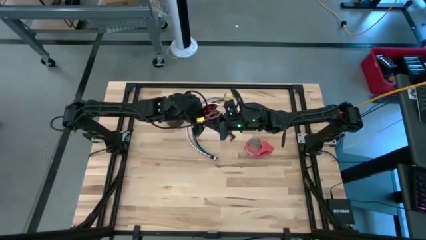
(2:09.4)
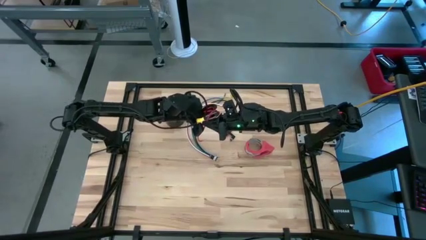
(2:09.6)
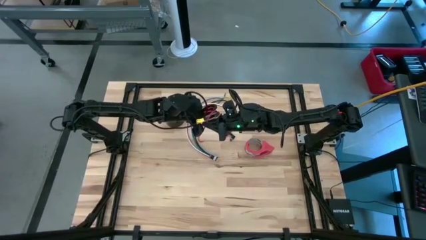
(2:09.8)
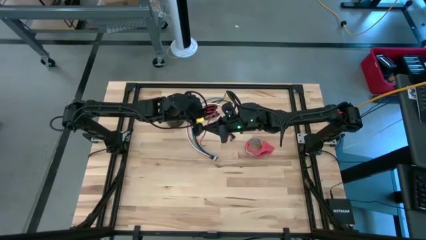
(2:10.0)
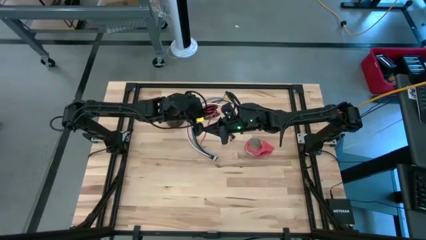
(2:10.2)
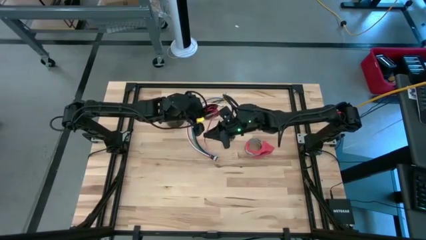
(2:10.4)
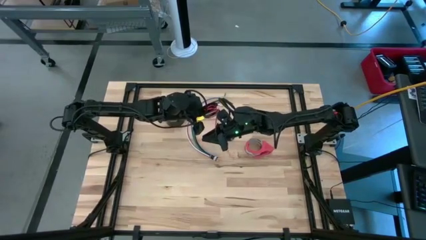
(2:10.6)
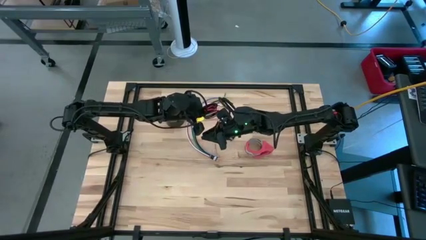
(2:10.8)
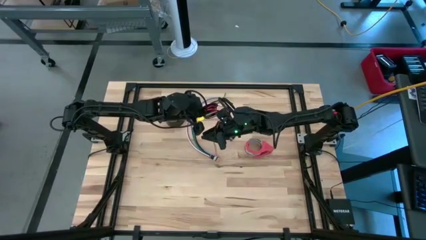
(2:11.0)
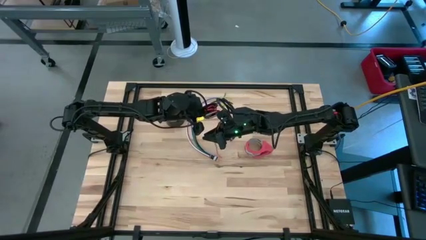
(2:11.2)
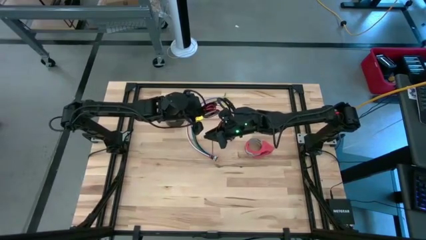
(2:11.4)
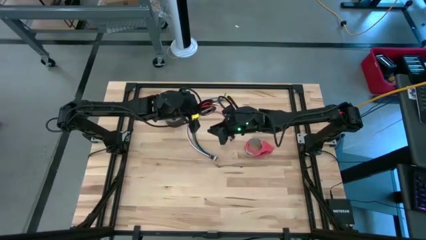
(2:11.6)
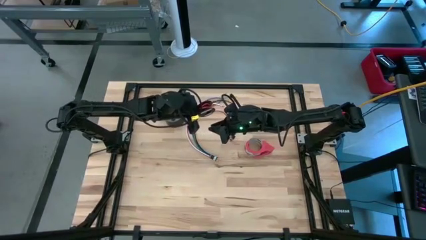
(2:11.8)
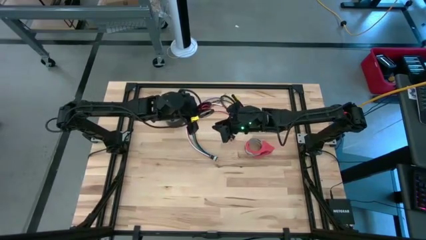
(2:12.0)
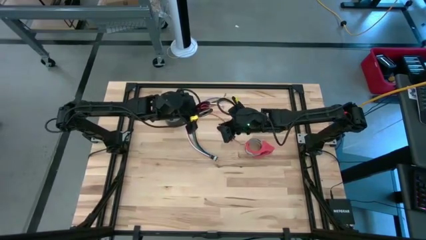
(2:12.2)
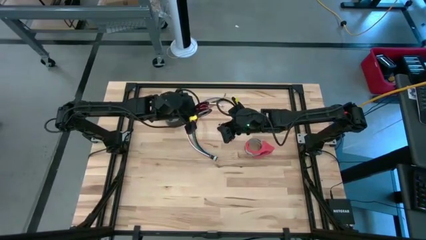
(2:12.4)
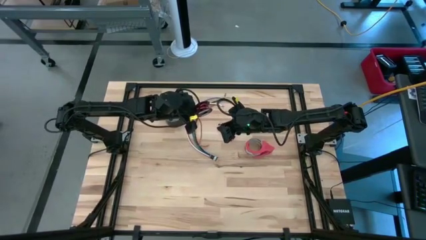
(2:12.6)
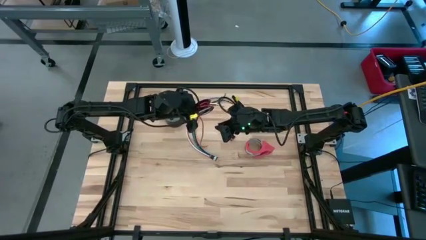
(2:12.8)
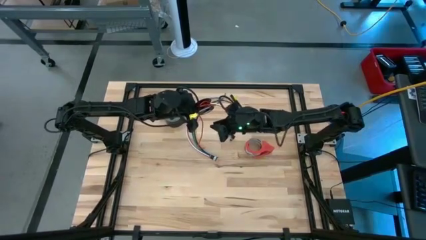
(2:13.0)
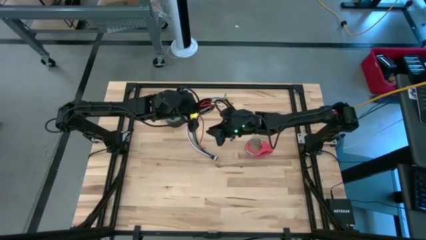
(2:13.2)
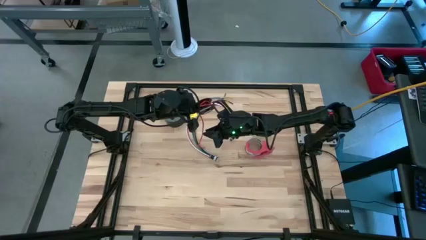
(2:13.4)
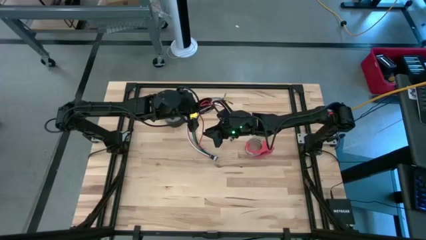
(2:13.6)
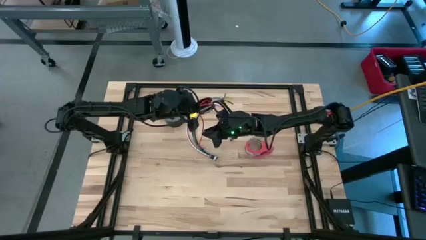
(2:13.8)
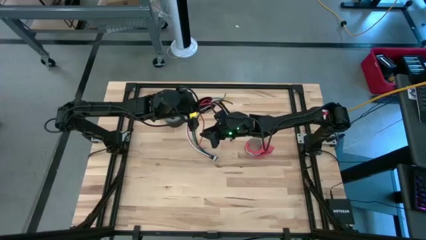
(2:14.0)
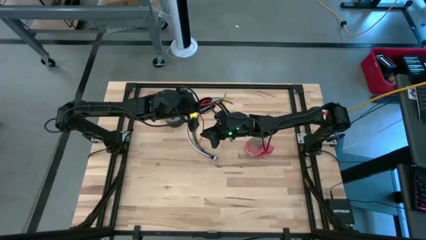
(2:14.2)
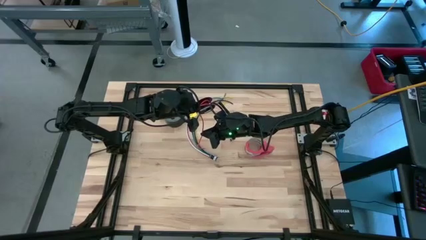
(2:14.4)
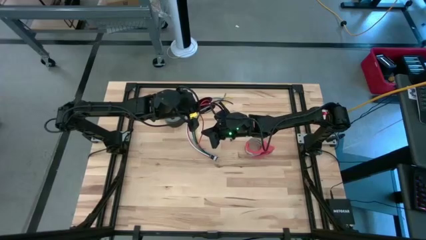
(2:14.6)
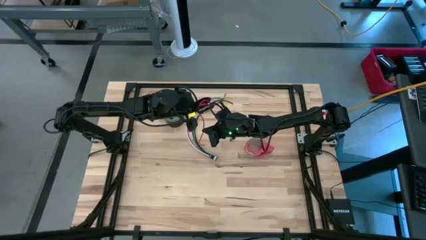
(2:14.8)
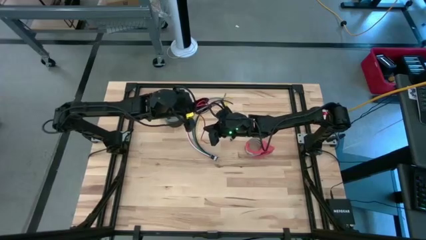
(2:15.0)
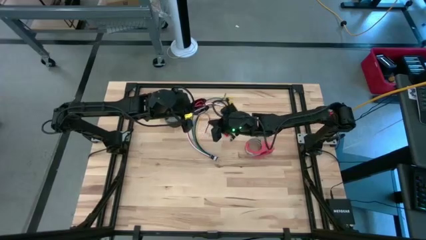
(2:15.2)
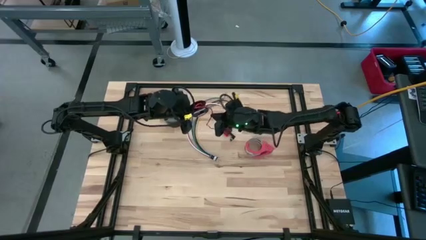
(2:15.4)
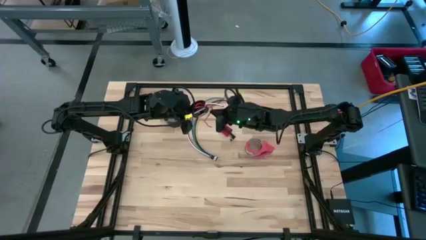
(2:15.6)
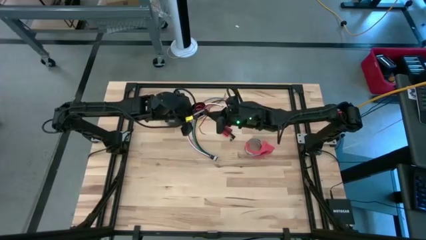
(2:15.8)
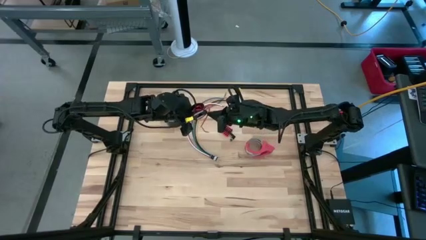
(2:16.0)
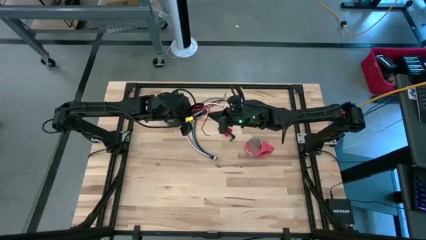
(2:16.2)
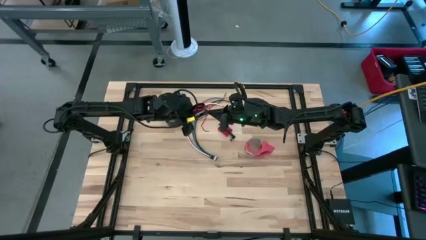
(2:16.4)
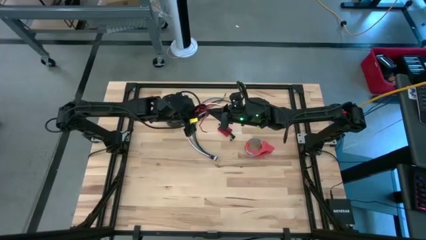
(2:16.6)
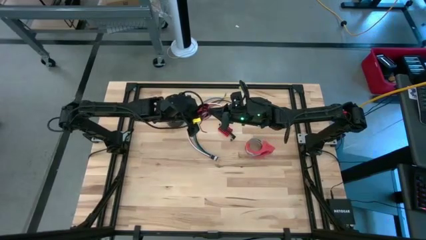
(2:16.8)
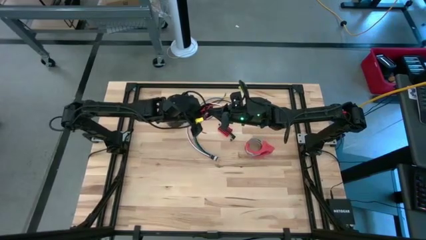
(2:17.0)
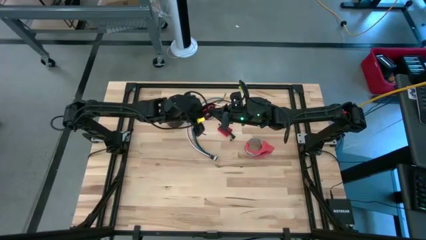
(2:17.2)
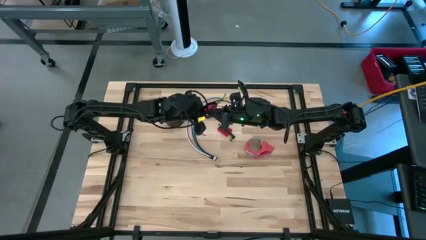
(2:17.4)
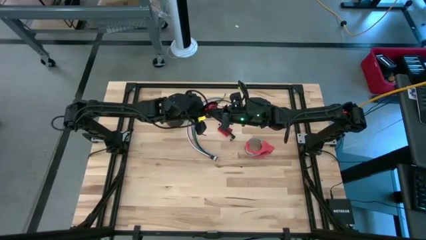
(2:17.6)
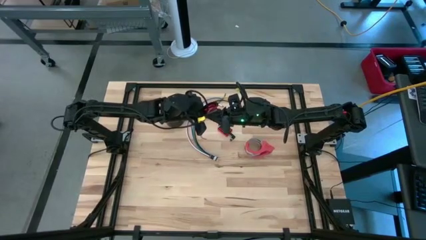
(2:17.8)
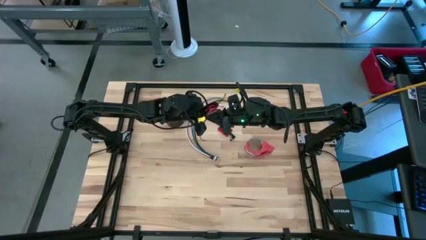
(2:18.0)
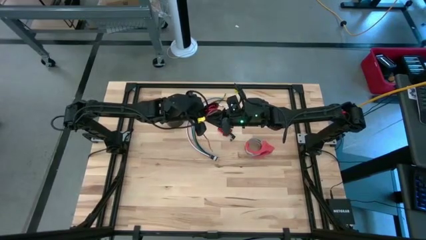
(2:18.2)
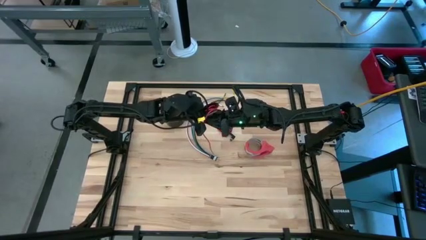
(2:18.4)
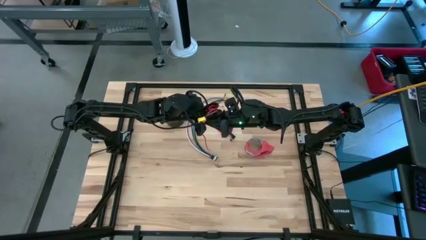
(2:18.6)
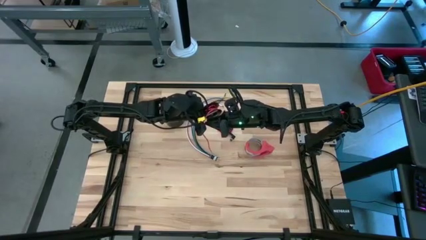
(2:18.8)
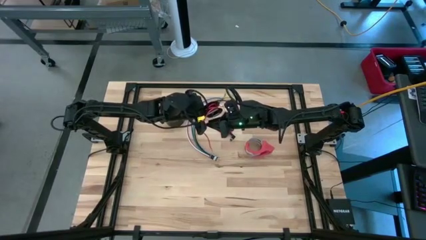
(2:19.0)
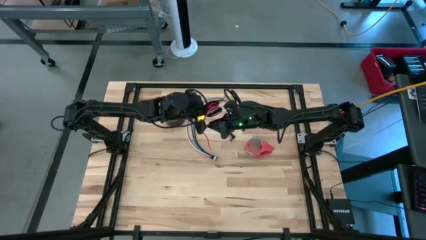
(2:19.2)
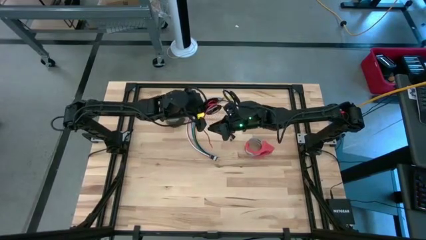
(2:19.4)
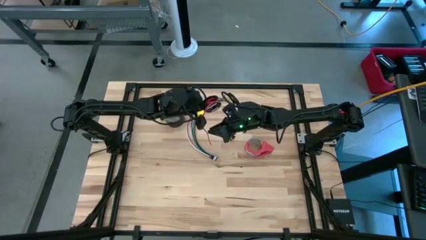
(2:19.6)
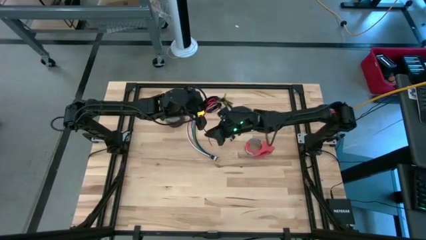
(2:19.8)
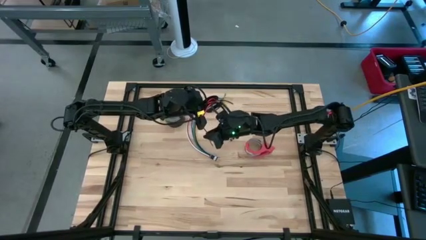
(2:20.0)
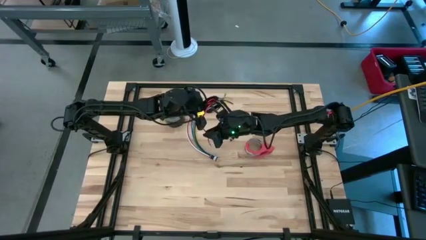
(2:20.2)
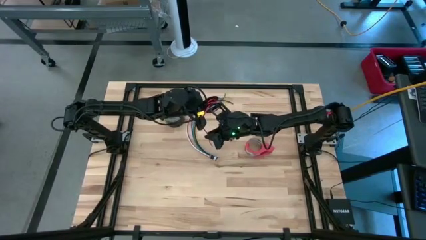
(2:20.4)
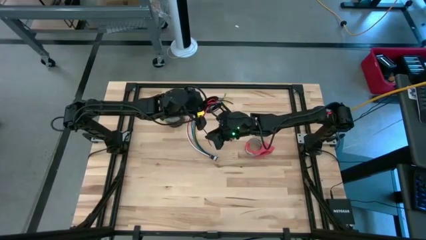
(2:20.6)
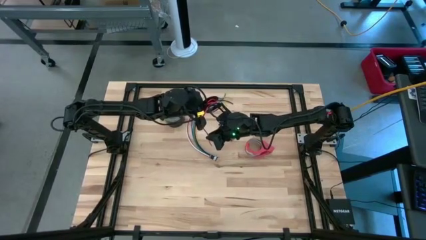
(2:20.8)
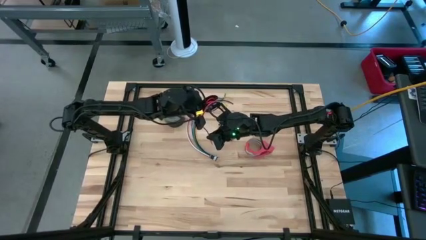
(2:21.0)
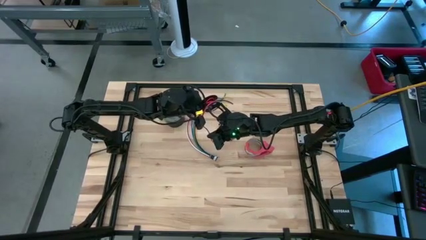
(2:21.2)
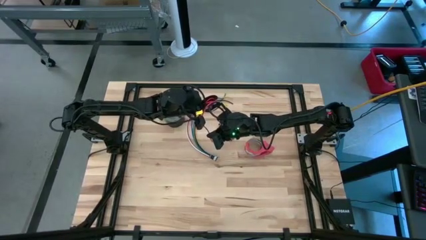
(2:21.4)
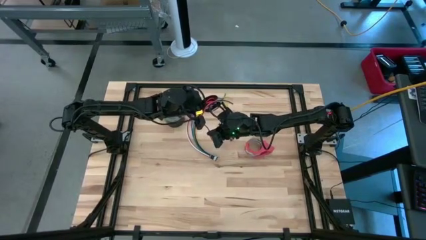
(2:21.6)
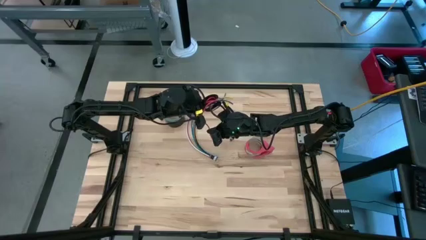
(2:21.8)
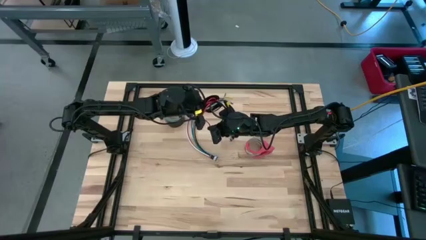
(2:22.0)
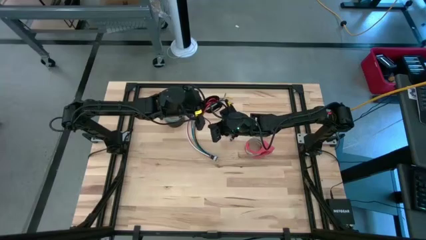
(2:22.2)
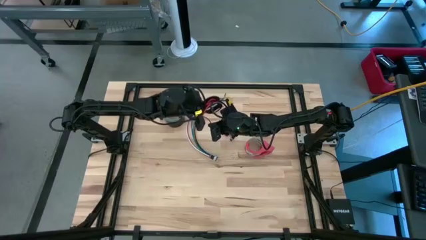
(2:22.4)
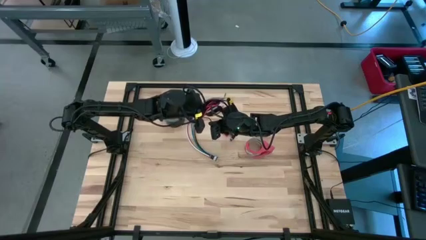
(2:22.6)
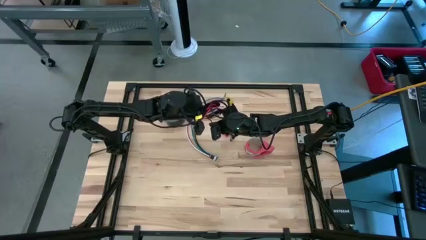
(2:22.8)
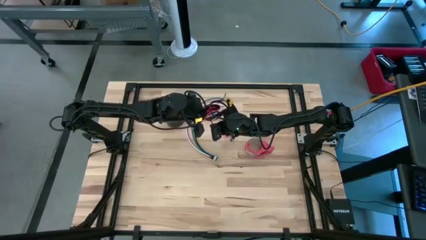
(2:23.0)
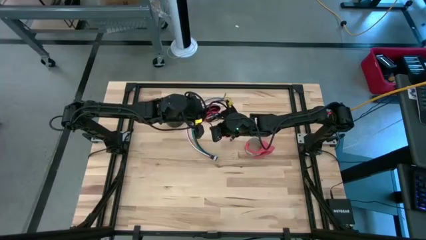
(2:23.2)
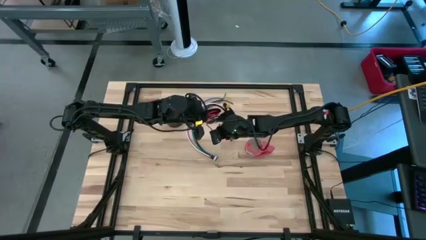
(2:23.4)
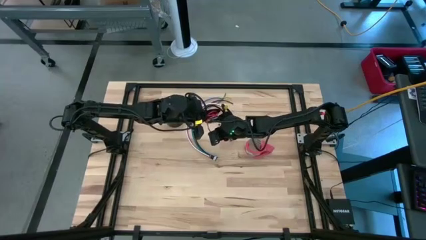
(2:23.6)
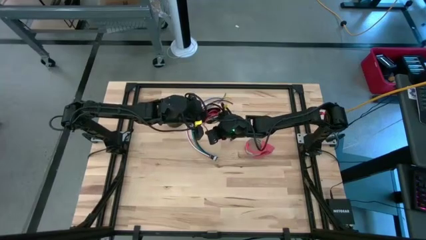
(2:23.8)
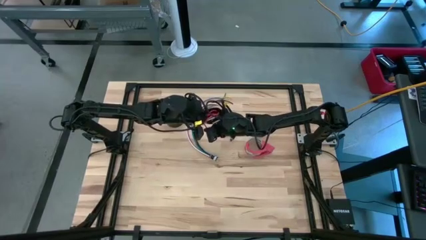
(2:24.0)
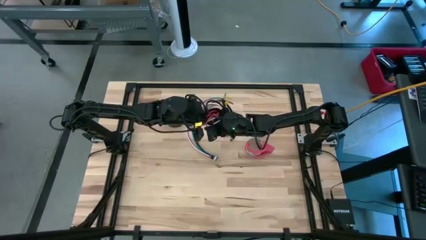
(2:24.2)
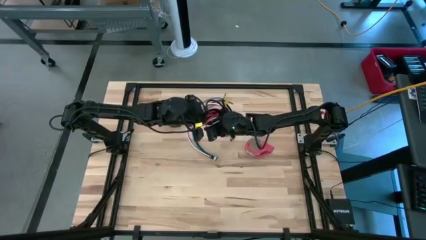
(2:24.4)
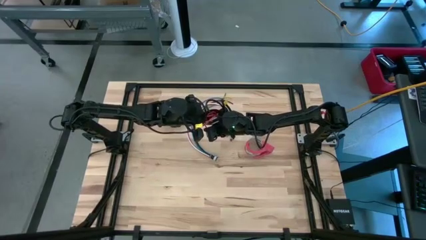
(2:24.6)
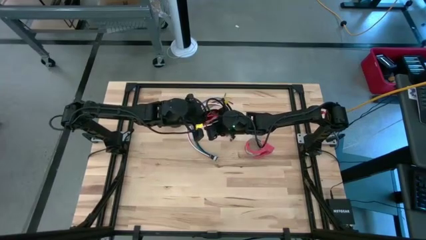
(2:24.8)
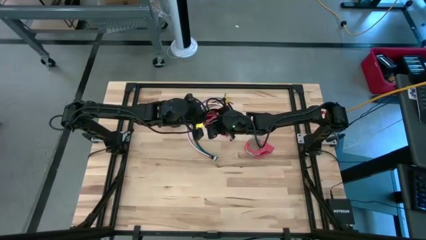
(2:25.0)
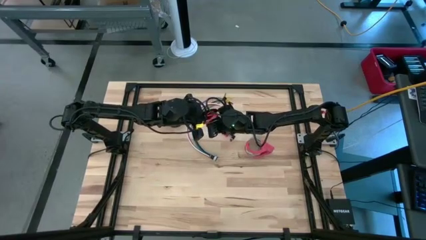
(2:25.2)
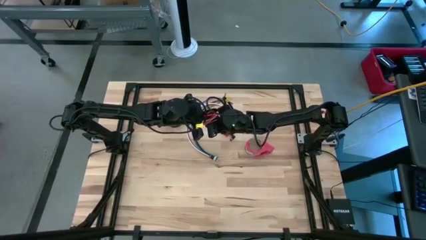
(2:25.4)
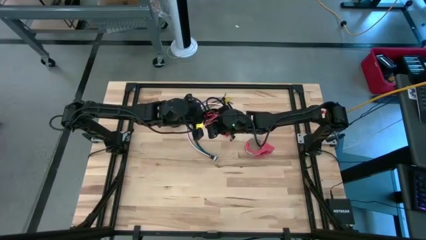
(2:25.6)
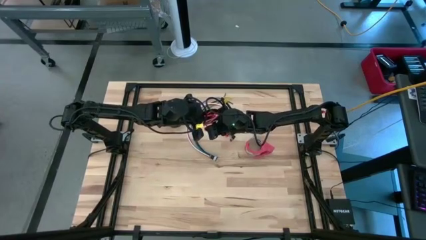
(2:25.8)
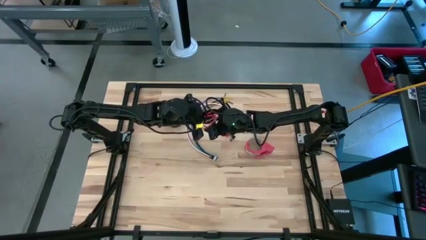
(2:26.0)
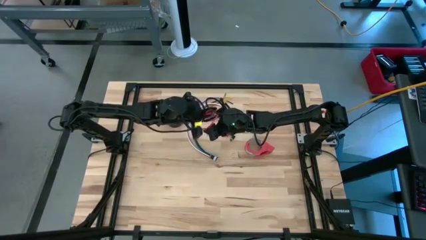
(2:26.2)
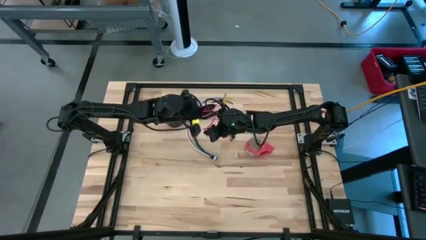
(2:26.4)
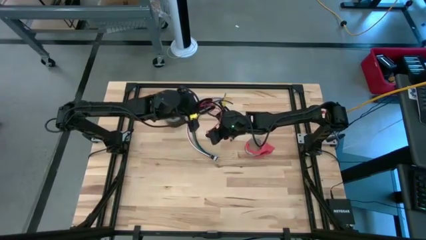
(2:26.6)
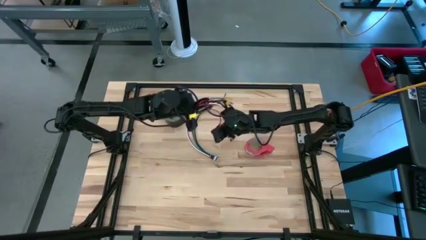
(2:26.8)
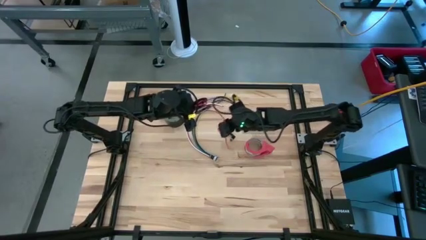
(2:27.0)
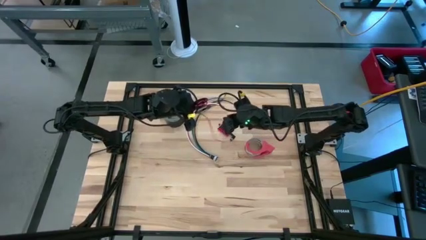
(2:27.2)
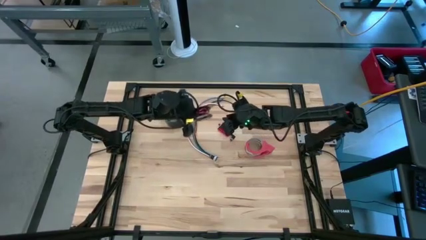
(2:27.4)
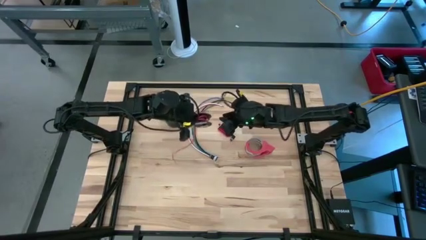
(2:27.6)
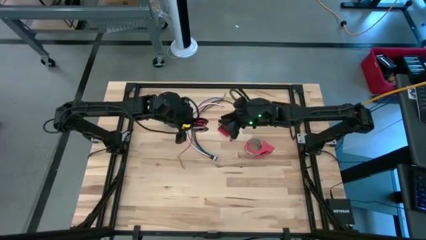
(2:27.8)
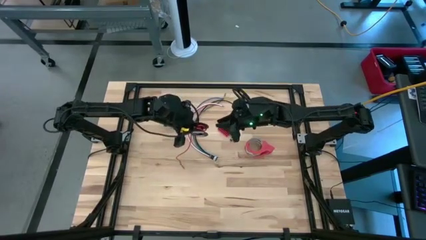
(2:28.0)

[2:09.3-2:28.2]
Task: Coil cords
Coil the red wire onto the spool
